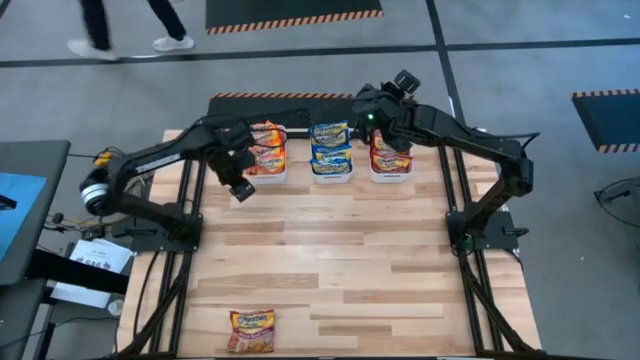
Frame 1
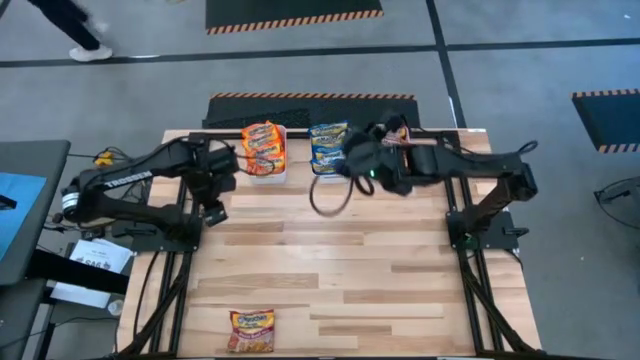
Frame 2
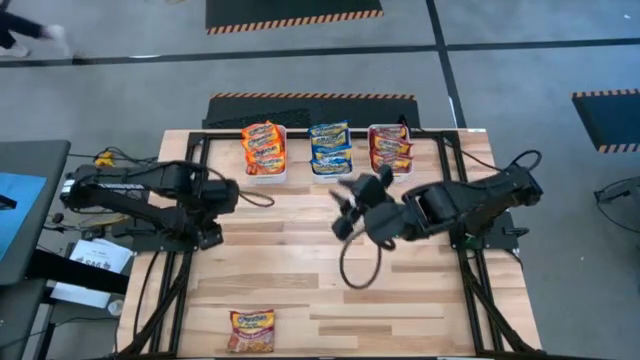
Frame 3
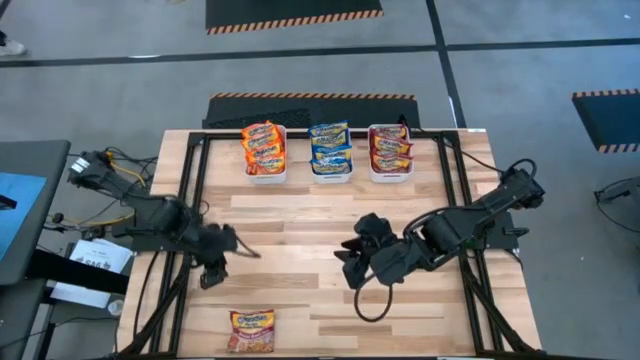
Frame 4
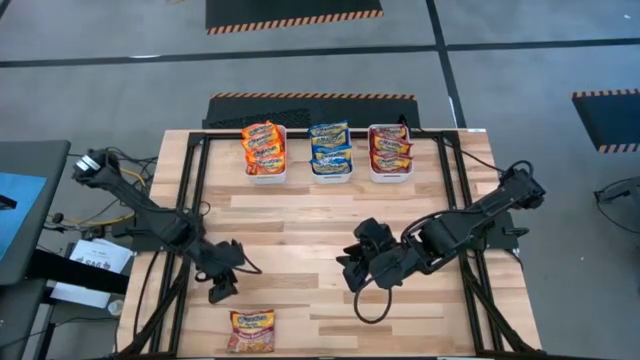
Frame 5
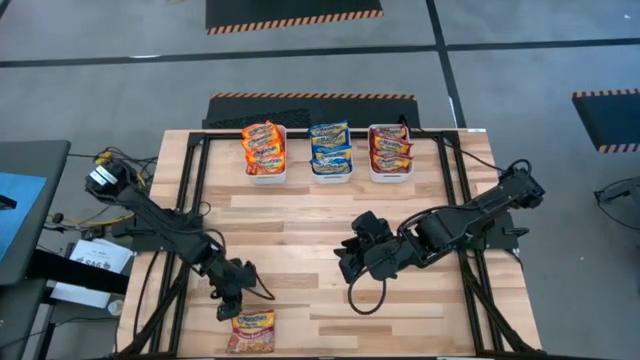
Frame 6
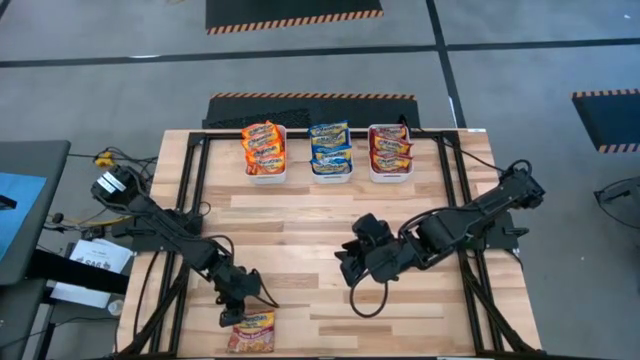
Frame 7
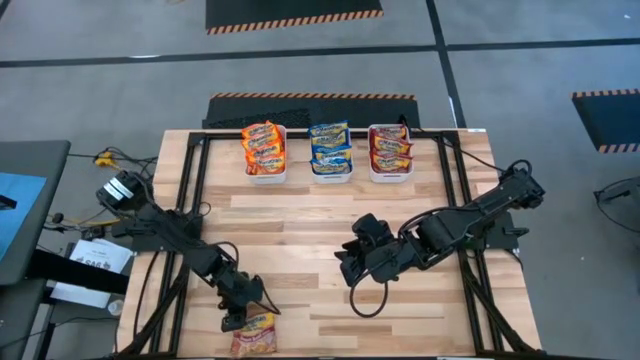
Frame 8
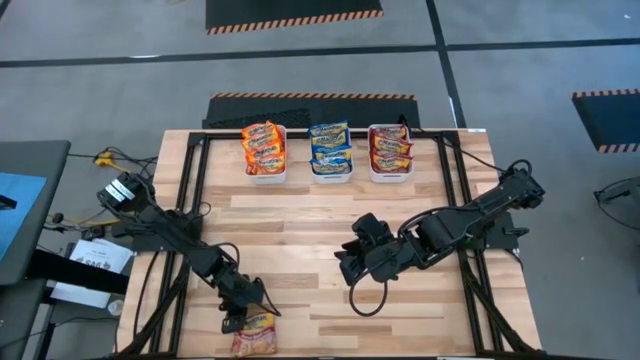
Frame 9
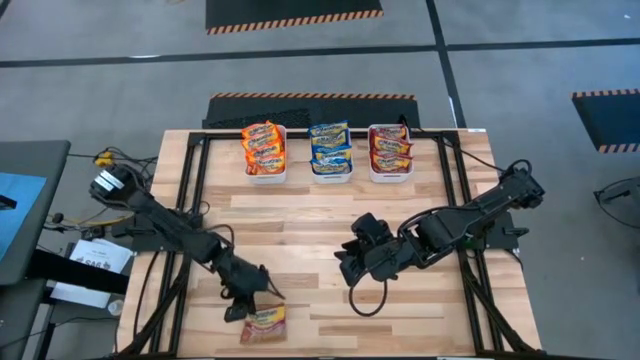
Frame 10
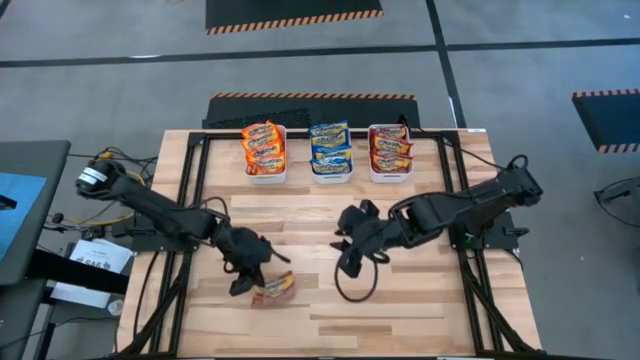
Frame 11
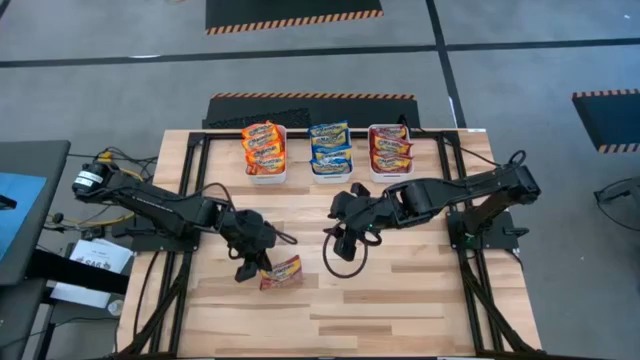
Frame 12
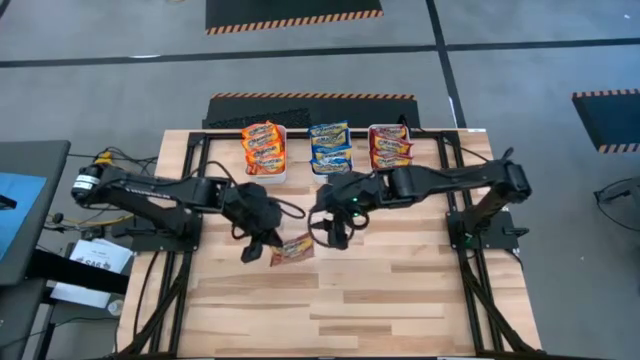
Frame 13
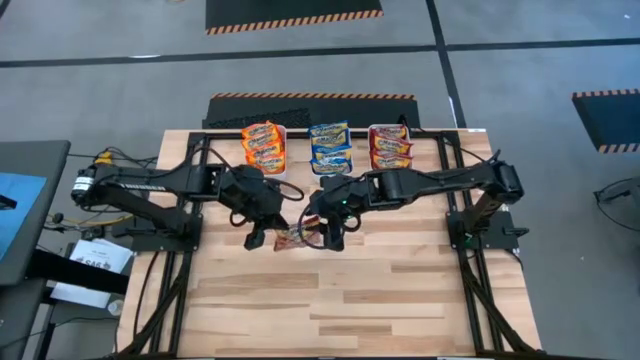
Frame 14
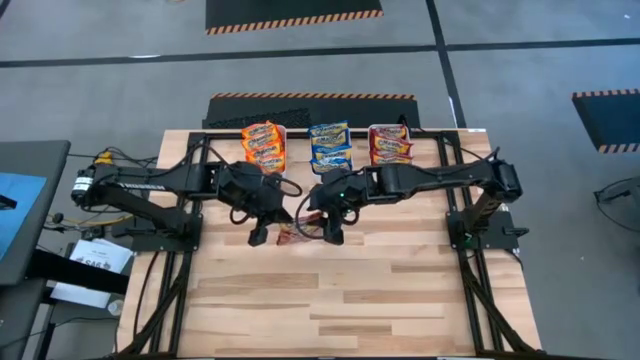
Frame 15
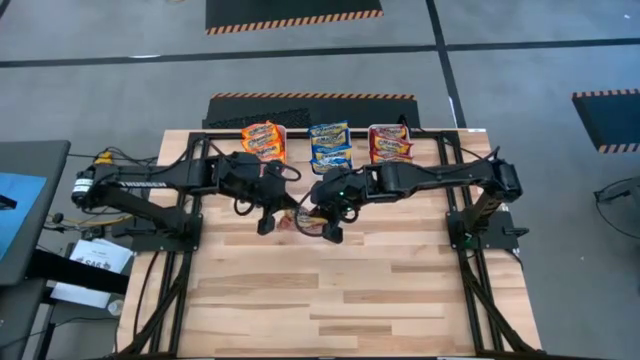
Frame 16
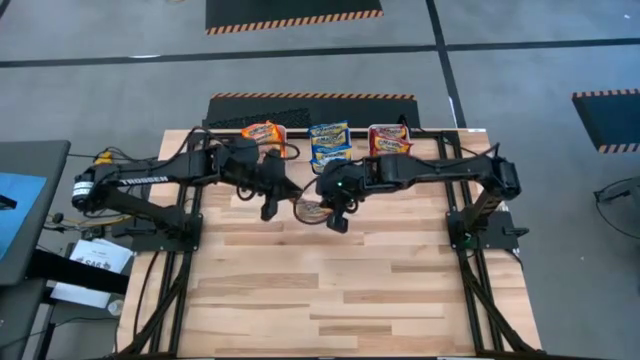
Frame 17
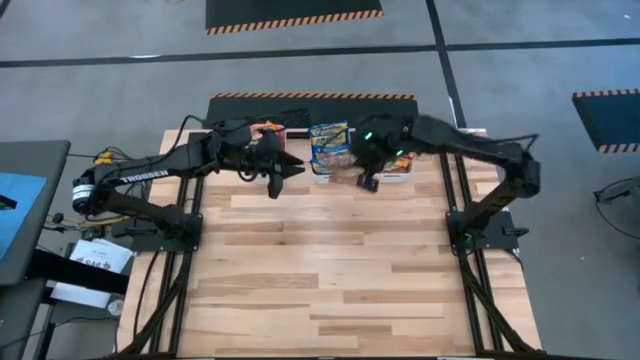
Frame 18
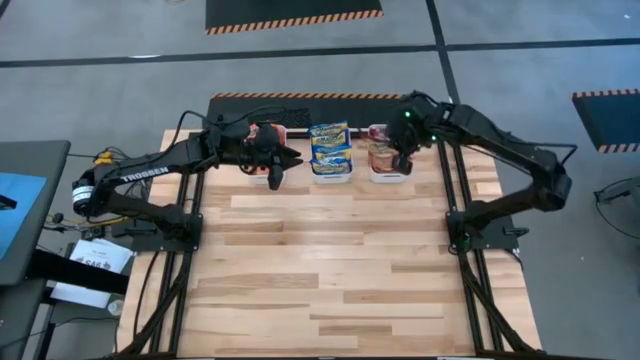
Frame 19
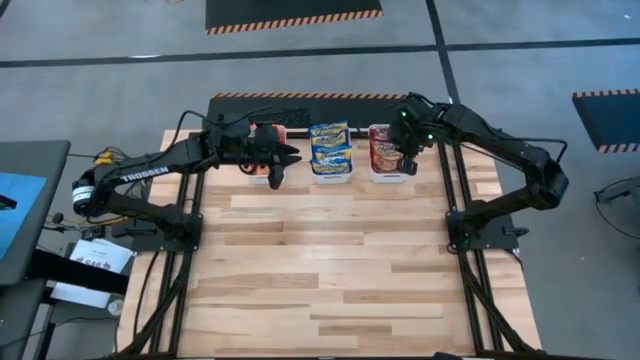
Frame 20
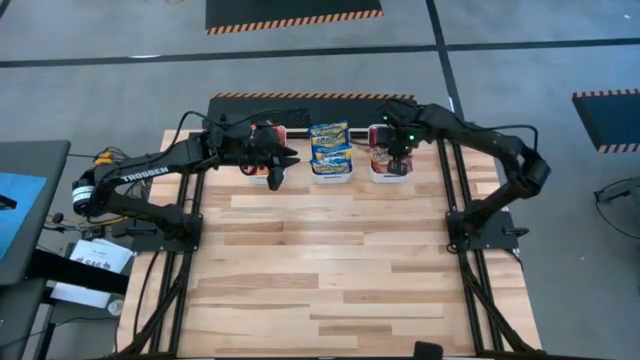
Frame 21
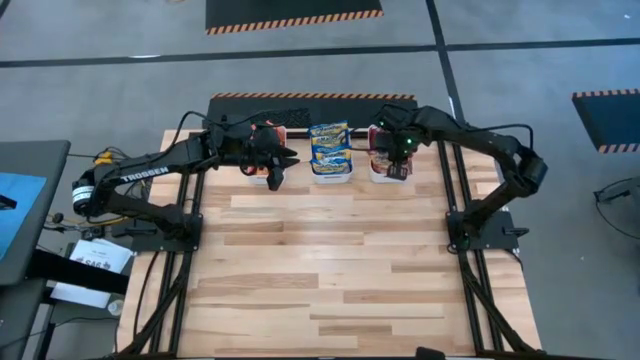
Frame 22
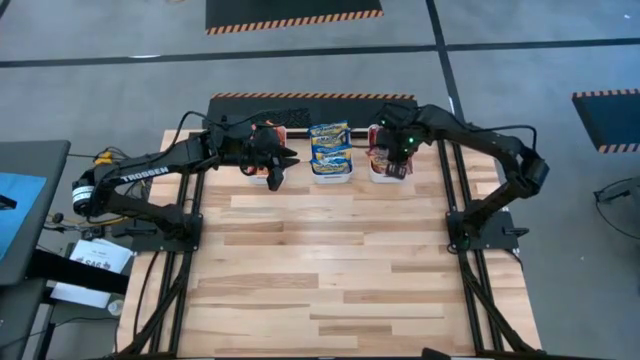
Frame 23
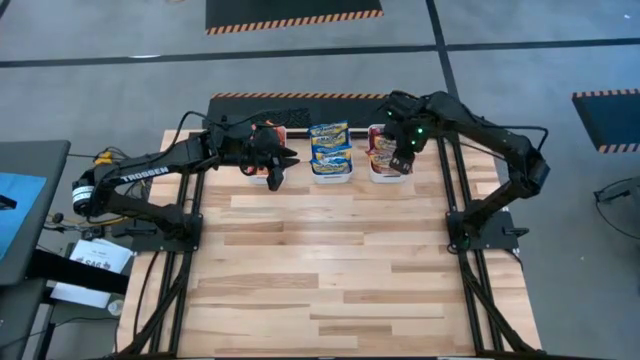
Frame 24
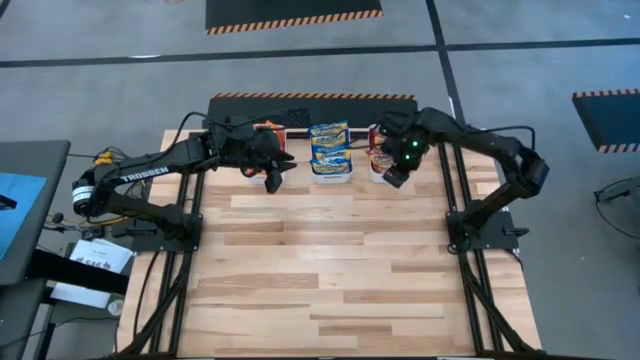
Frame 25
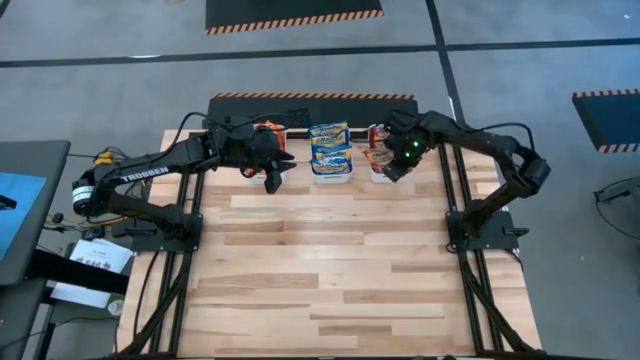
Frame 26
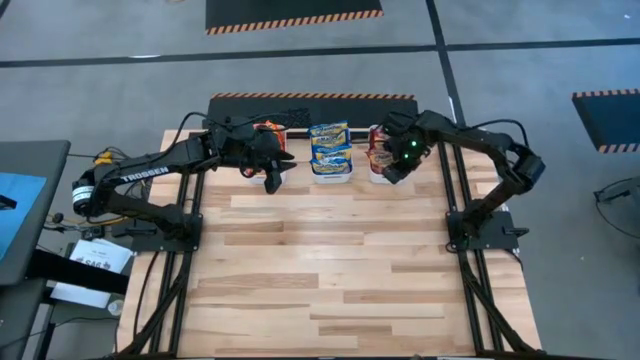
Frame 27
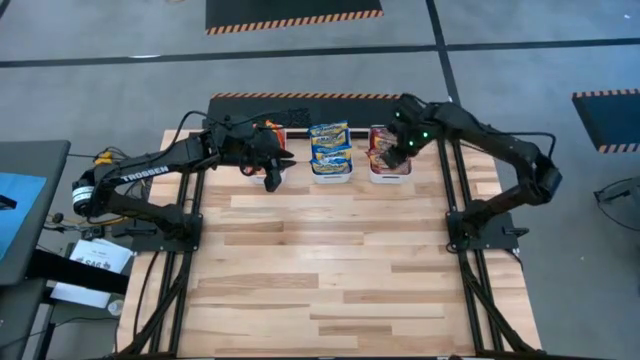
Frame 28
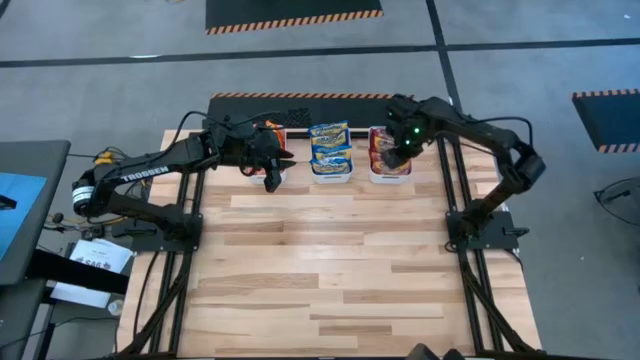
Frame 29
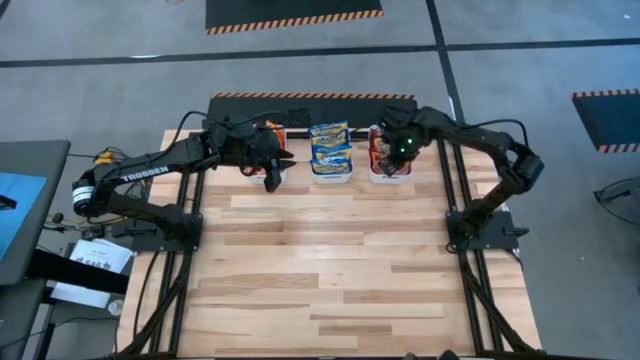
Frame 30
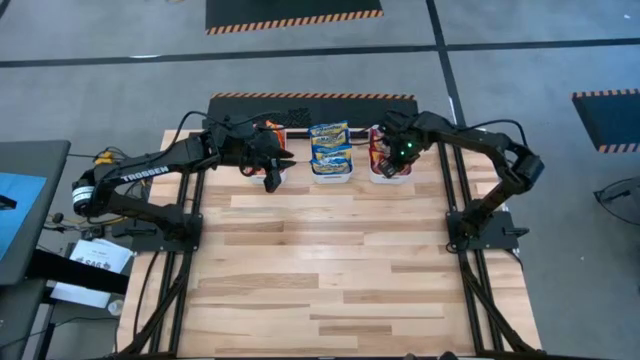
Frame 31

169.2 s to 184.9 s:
Task: Sort Maruchan noodles
Put the red noodle pack into the right white bin

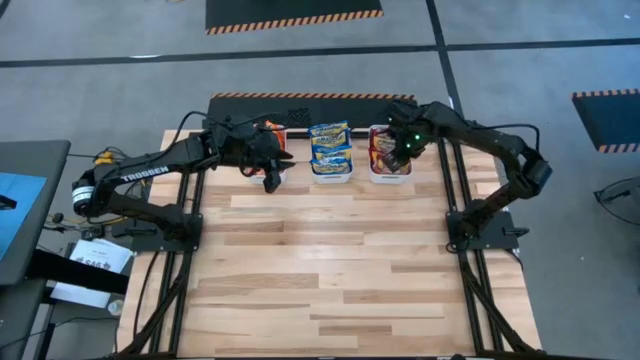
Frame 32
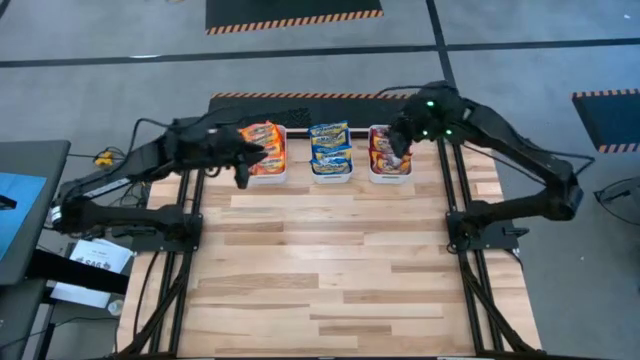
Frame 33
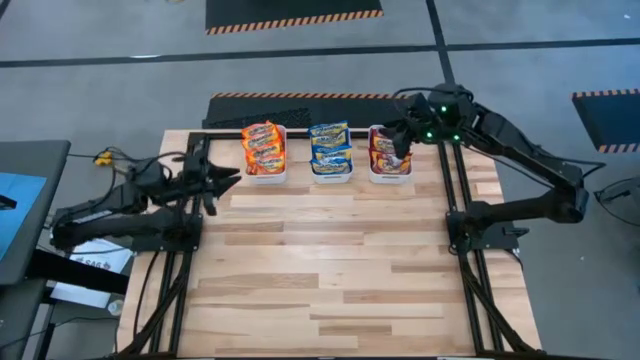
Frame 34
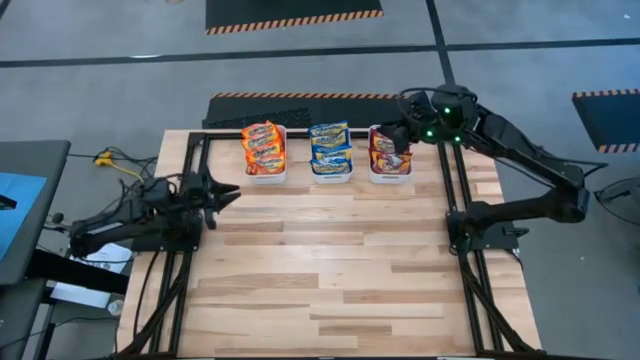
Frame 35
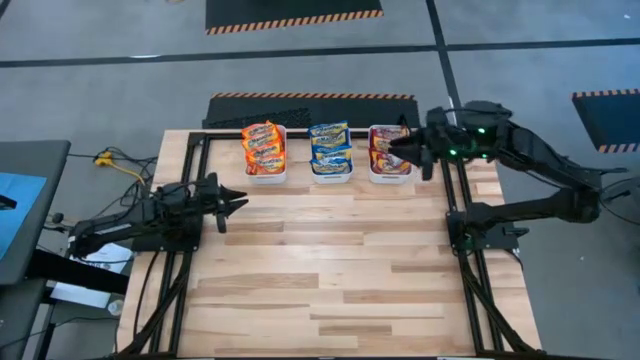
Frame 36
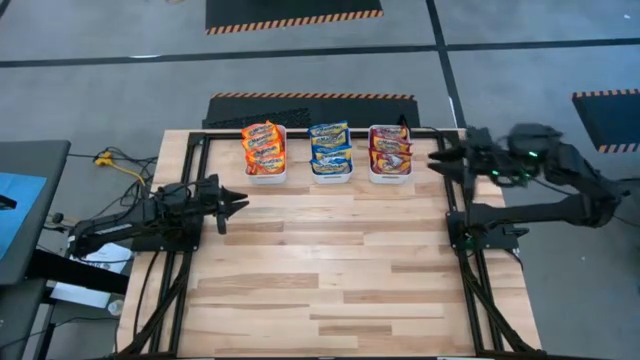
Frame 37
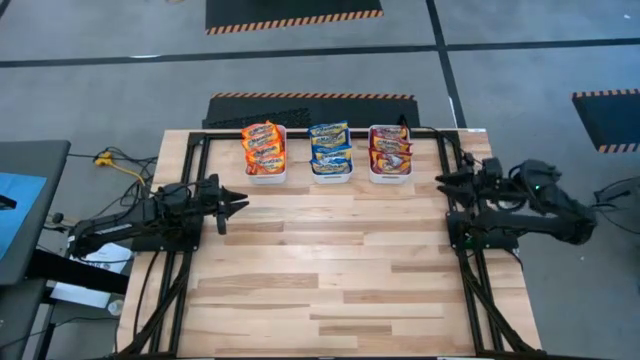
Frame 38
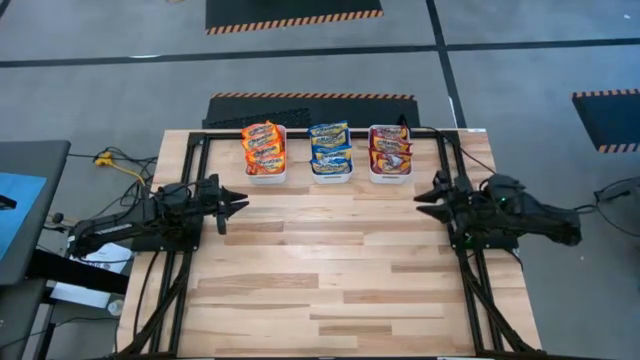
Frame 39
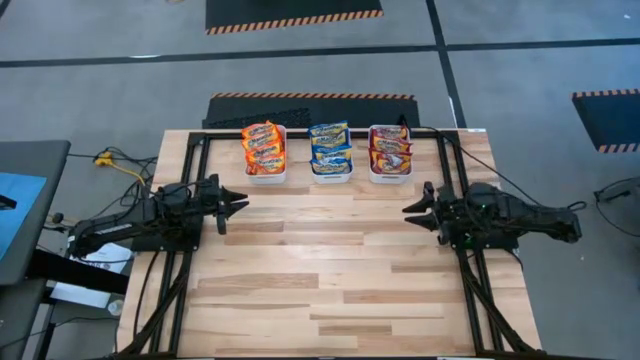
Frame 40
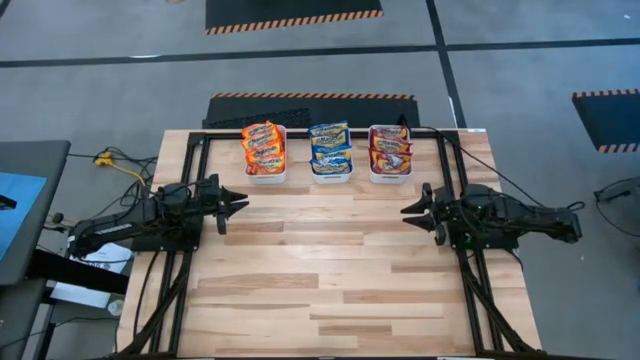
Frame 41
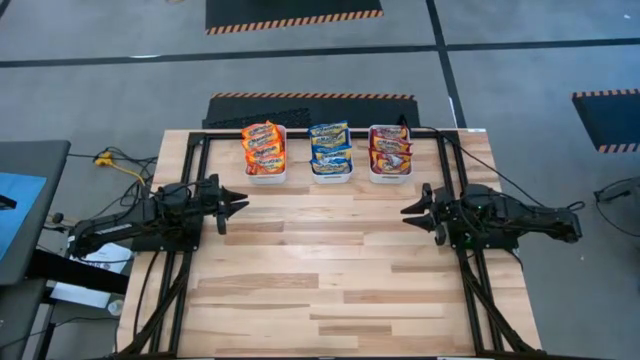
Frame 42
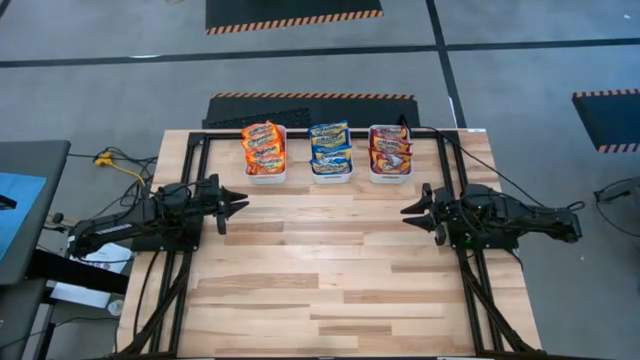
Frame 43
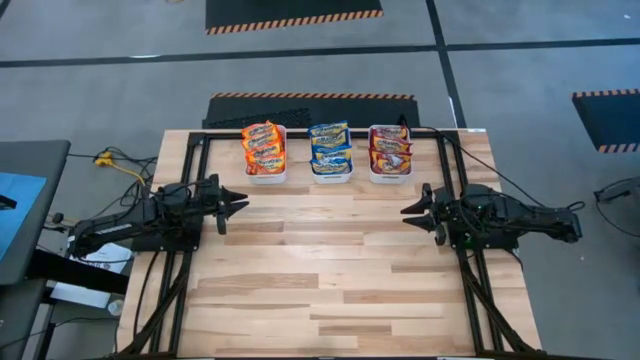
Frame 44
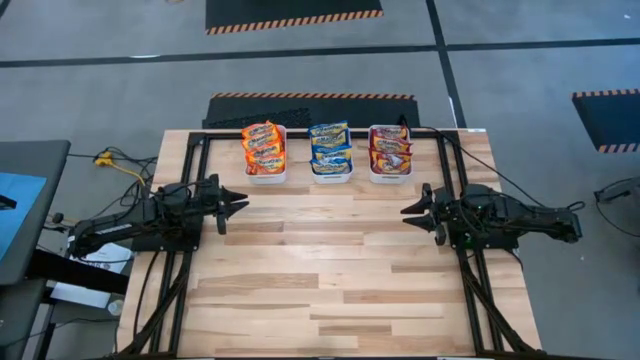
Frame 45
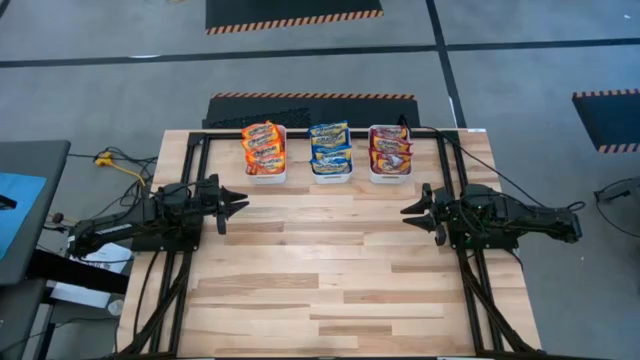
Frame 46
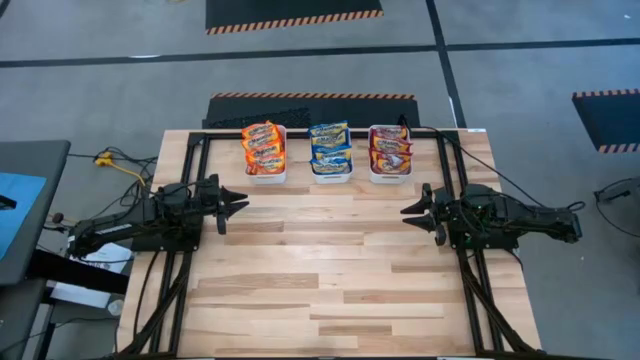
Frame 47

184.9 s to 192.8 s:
Return to Home Position
